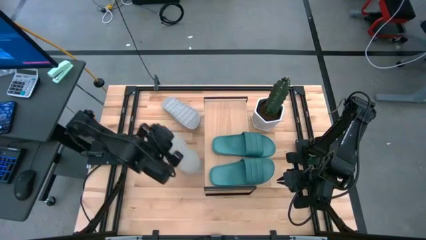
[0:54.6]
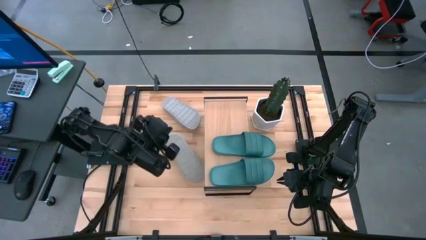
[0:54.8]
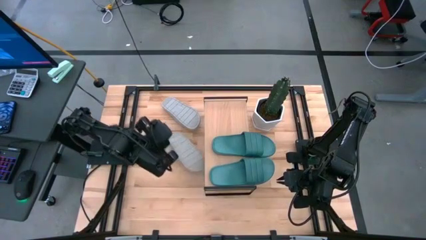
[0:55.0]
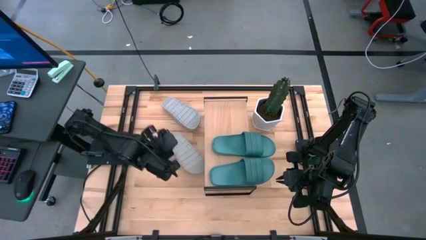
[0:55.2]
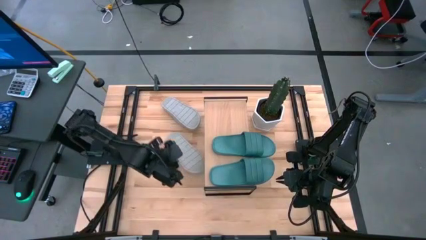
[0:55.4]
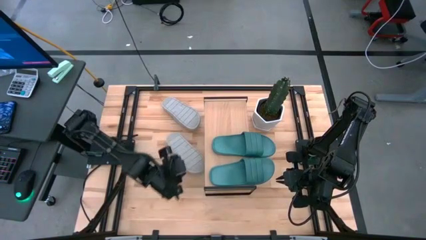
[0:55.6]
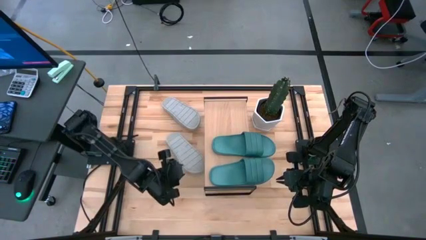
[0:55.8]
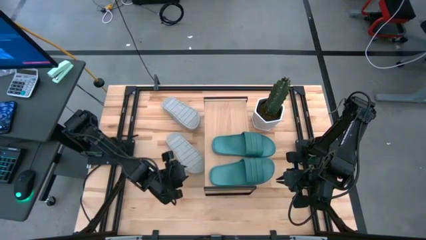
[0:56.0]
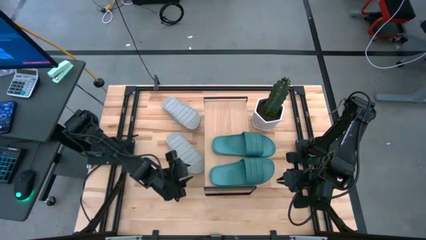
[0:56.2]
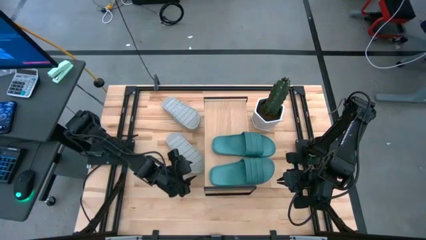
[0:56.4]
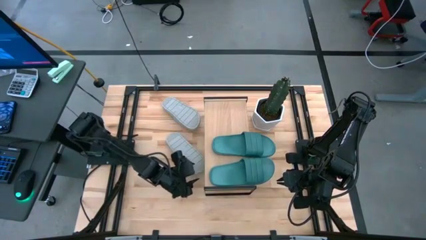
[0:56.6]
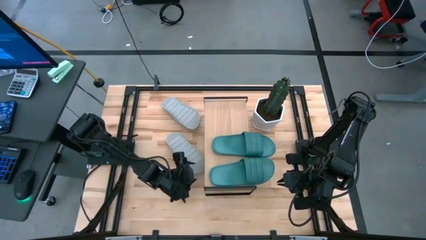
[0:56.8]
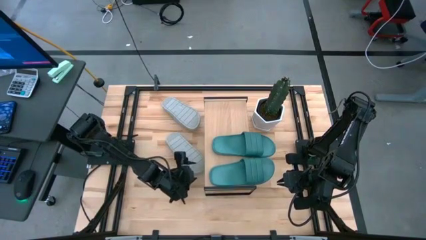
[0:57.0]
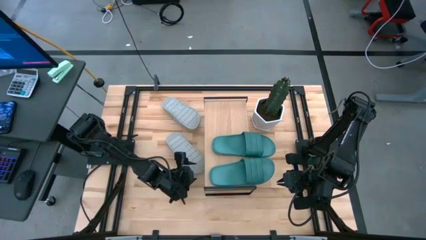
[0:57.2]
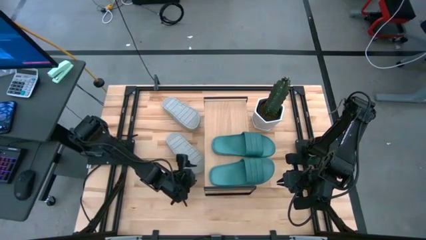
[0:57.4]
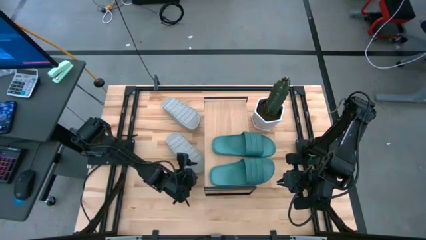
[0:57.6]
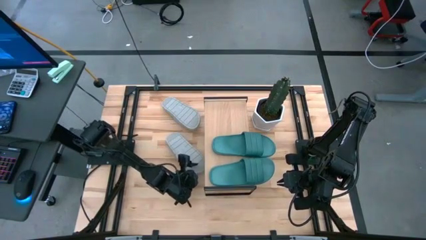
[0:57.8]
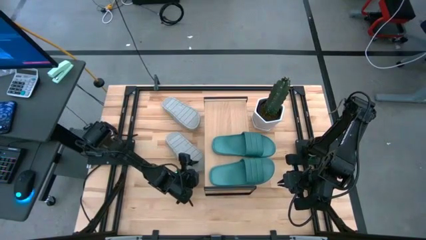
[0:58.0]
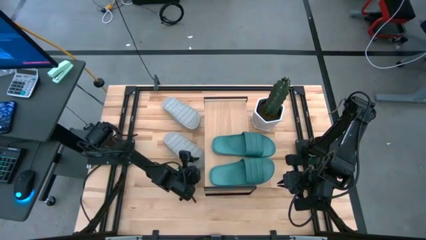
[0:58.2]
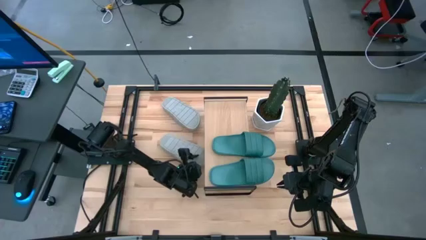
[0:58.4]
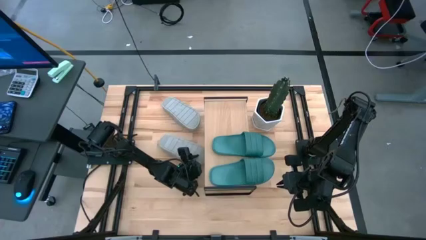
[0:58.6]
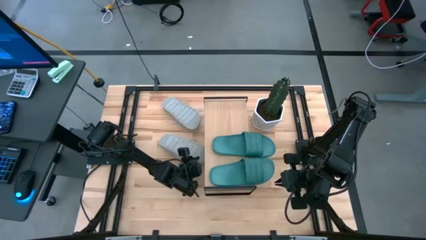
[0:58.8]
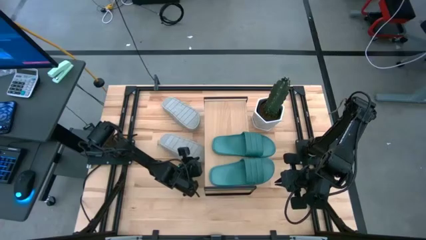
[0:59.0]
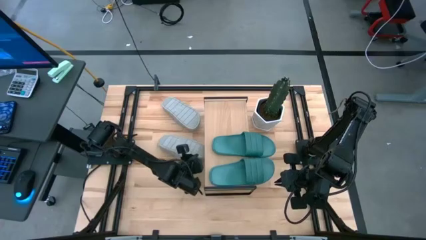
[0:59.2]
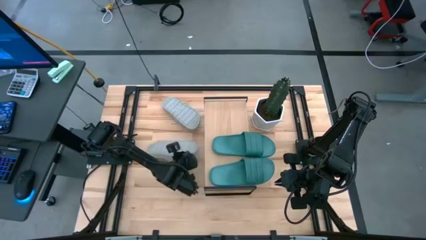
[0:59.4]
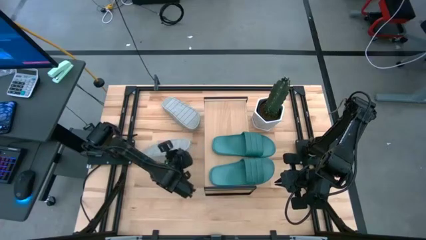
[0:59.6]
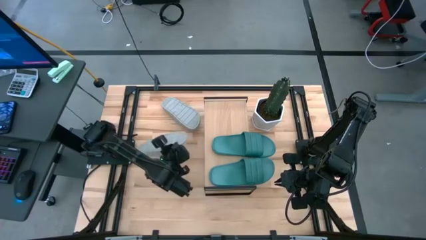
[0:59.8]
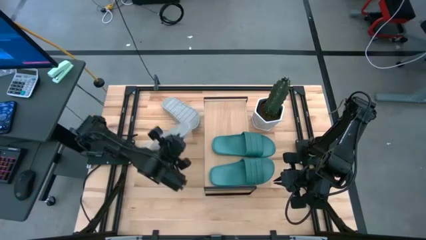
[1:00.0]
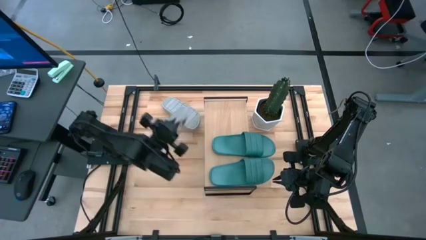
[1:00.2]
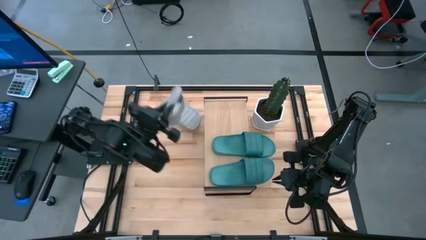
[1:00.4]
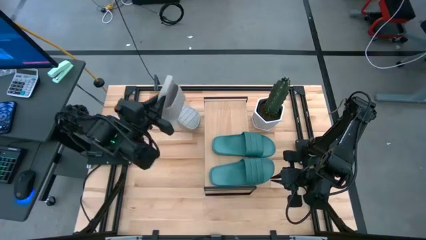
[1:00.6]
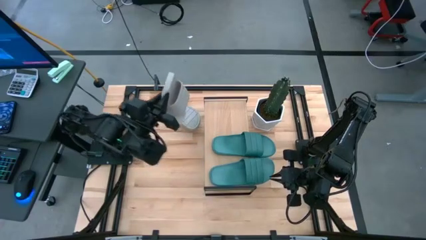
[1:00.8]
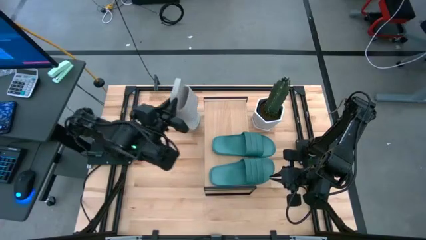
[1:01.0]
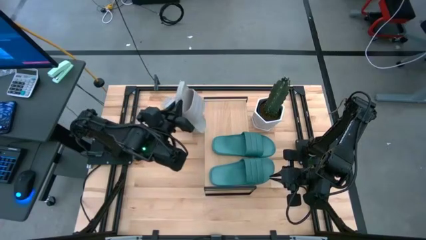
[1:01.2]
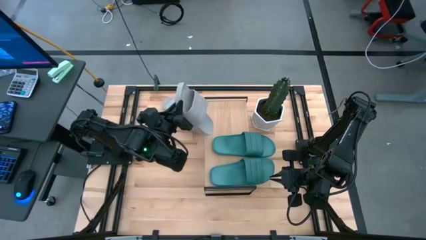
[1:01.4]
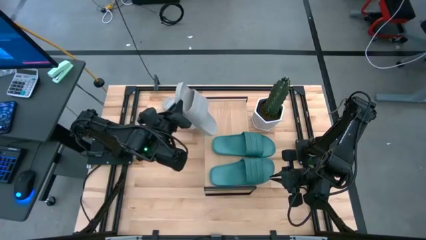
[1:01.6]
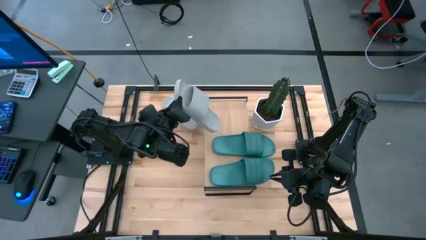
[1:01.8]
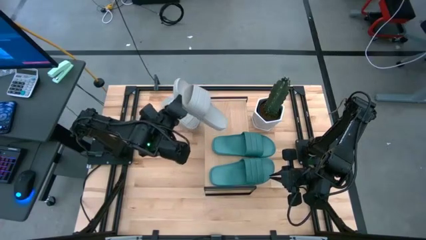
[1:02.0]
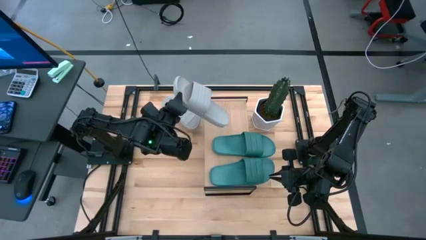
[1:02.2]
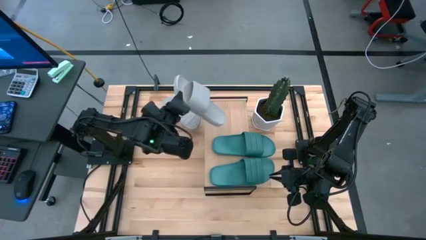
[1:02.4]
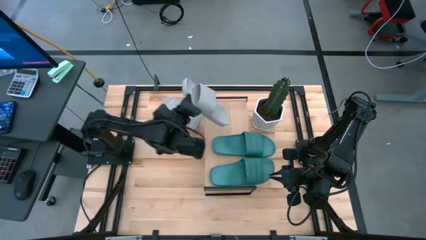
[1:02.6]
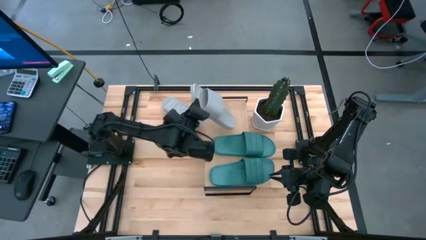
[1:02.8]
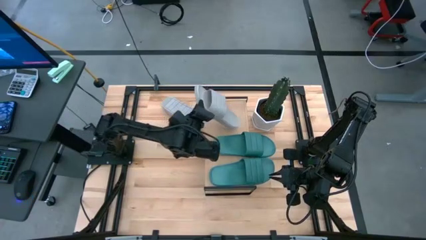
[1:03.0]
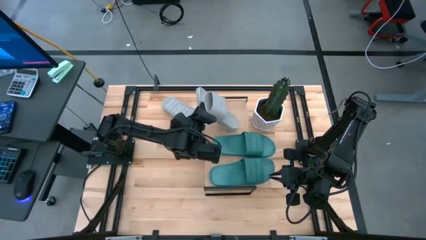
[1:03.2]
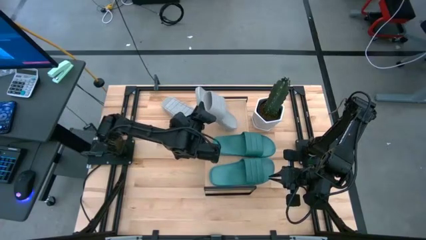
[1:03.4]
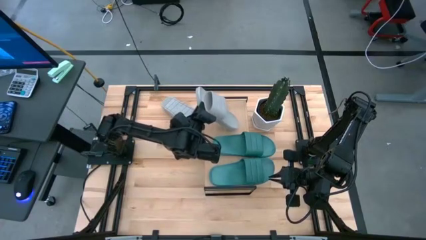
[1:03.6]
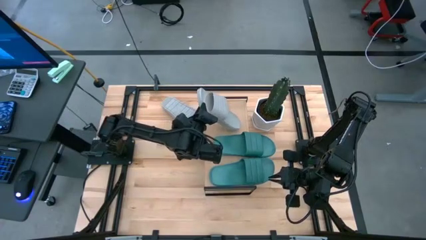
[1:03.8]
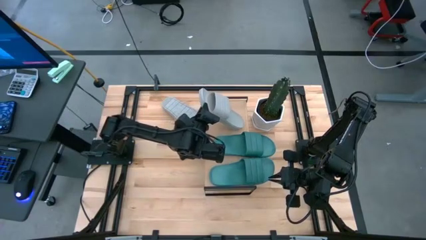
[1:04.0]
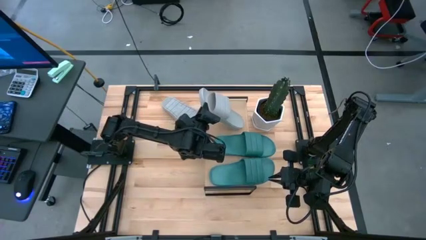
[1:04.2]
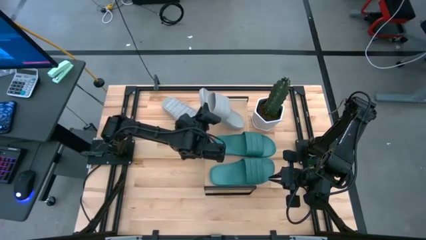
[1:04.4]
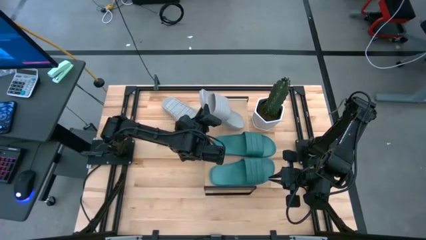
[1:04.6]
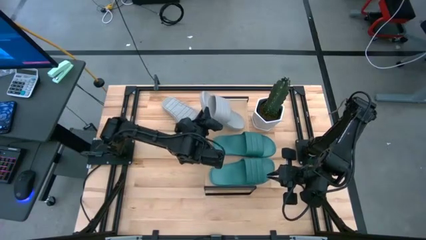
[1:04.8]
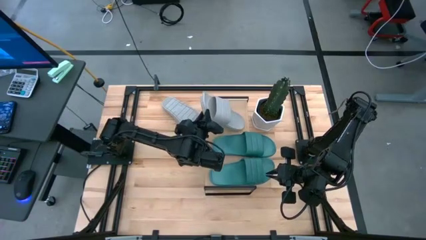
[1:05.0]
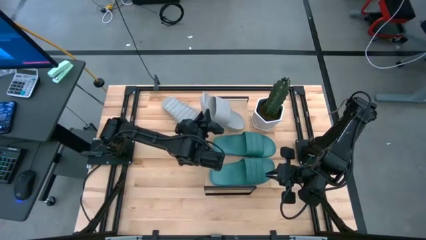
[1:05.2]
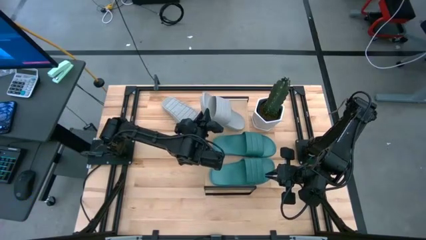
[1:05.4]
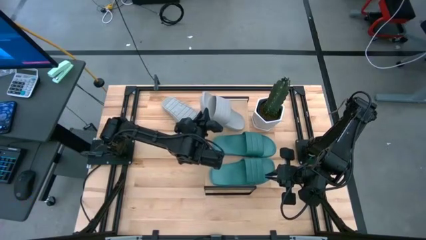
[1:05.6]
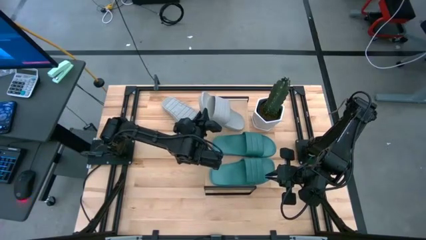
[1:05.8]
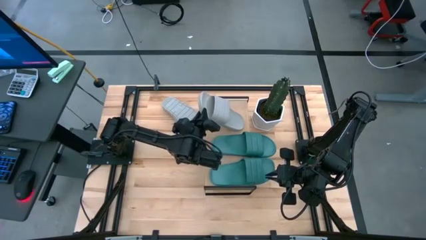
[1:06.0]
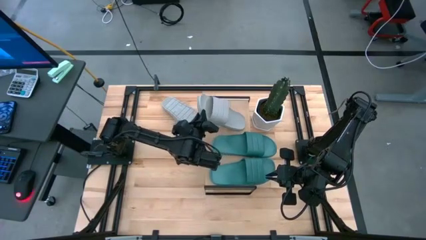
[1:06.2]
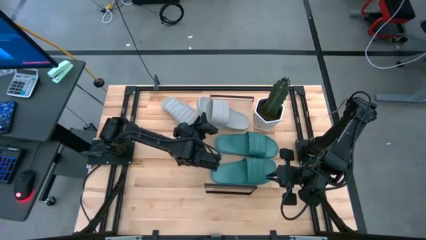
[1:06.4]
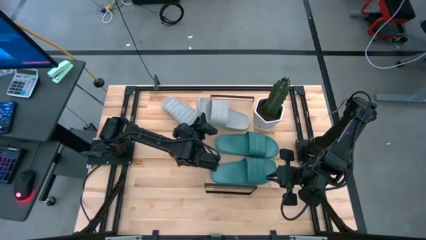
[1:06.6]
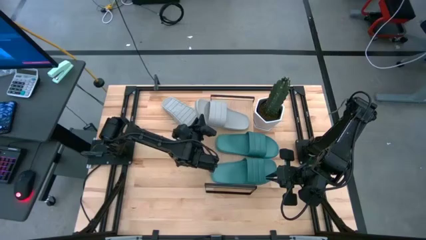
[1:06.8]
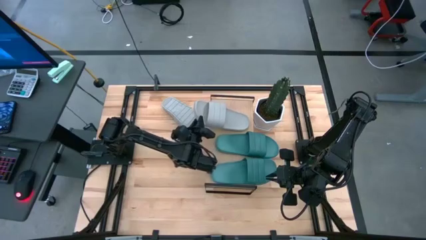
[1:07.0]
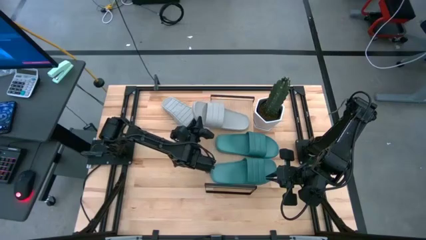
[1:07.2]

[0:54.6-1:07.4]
Task: Pick and place slides into the shelf
Put the bottom gray slide on the shelf
